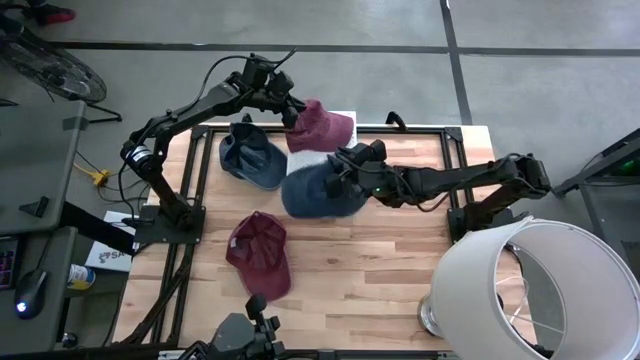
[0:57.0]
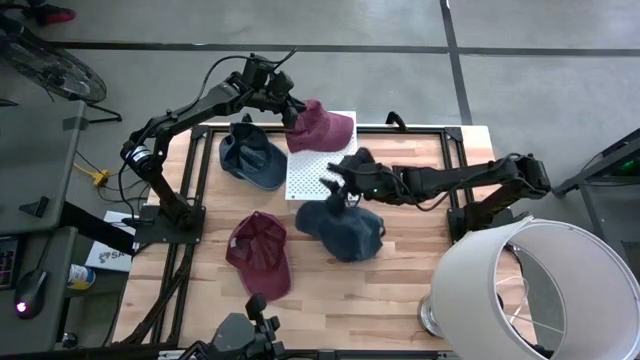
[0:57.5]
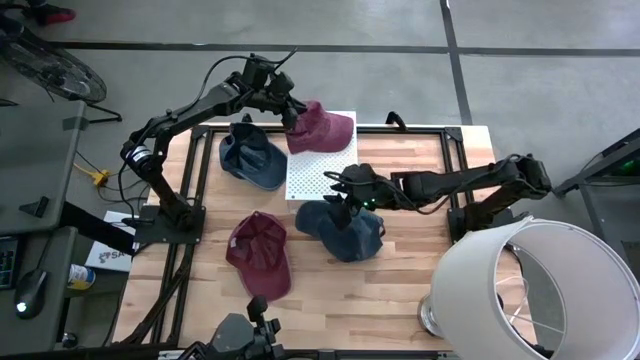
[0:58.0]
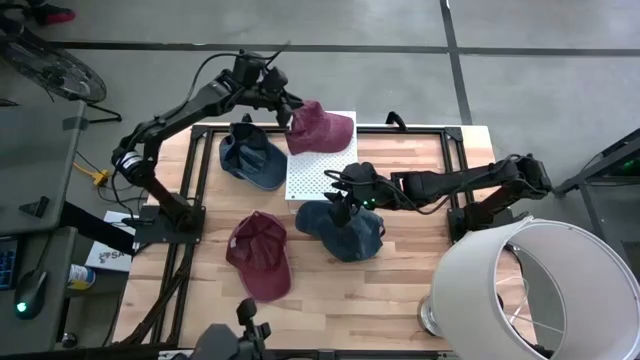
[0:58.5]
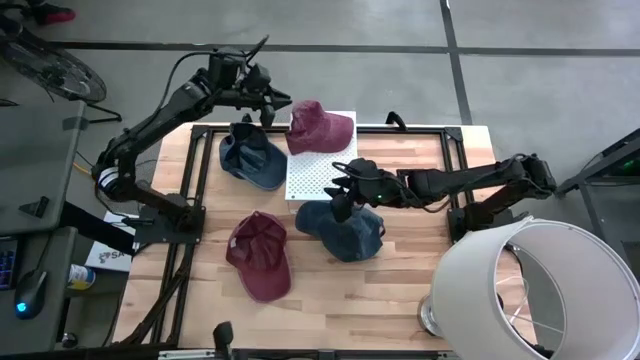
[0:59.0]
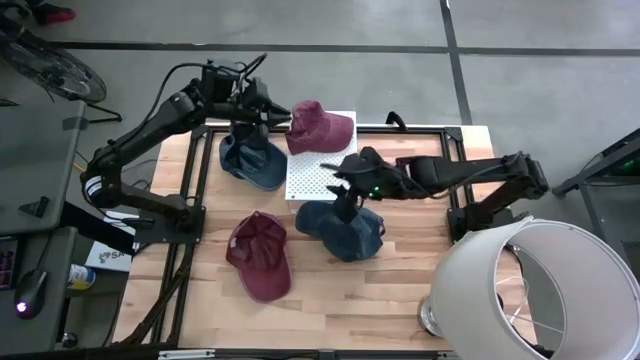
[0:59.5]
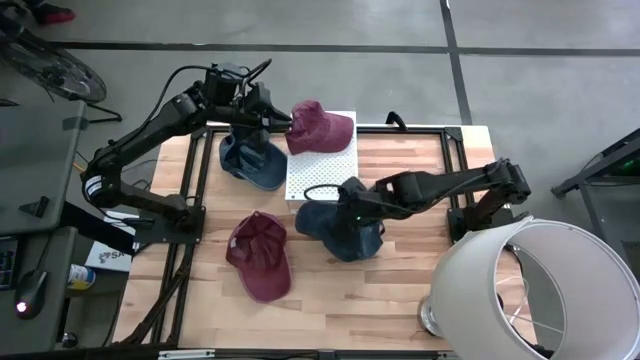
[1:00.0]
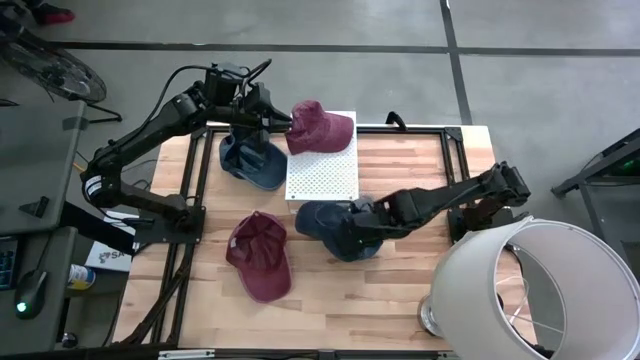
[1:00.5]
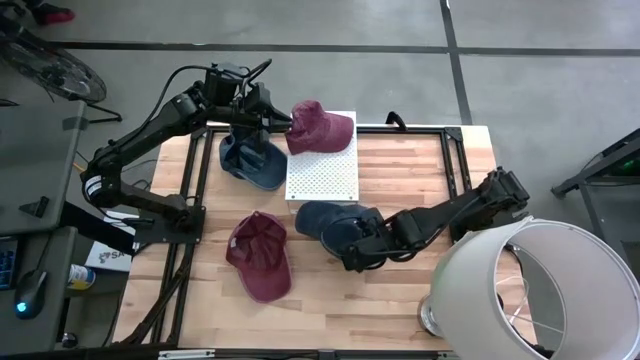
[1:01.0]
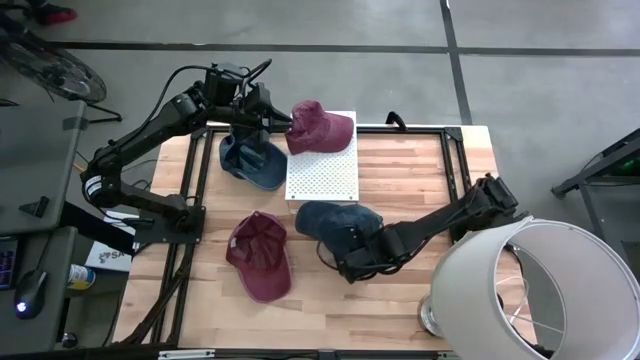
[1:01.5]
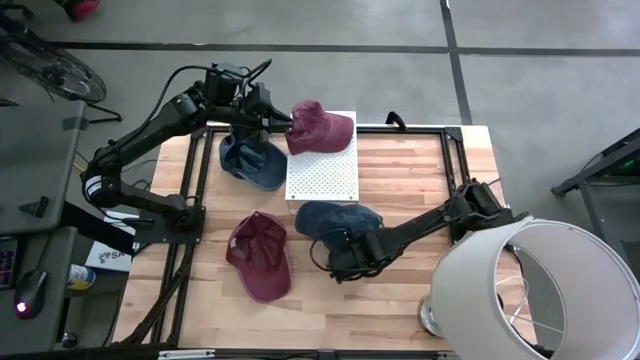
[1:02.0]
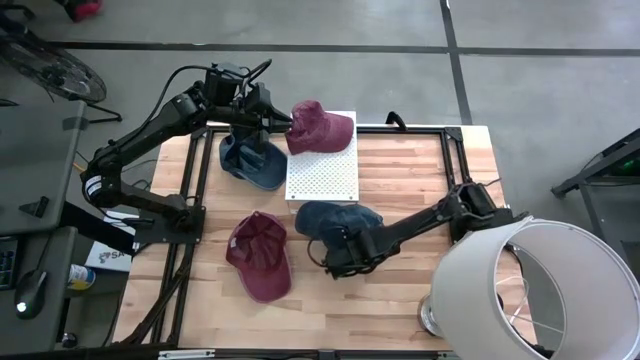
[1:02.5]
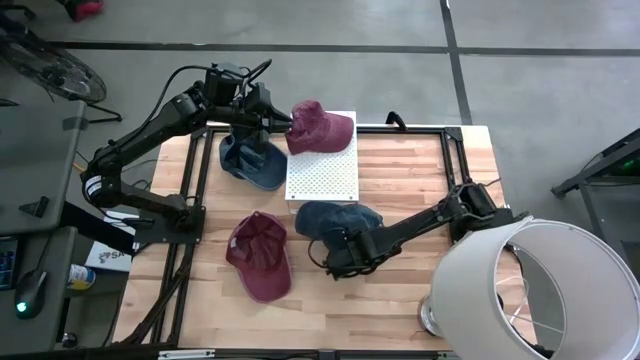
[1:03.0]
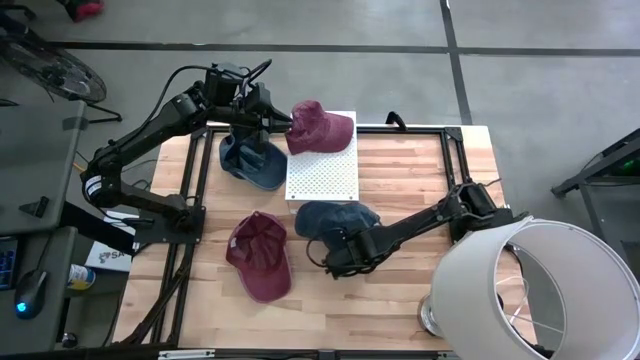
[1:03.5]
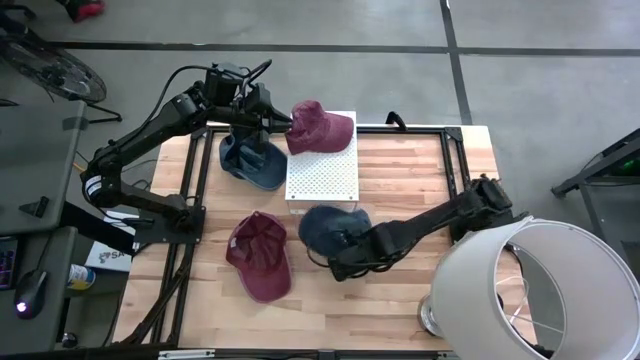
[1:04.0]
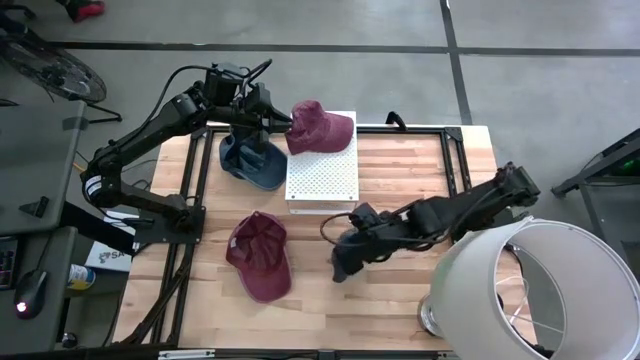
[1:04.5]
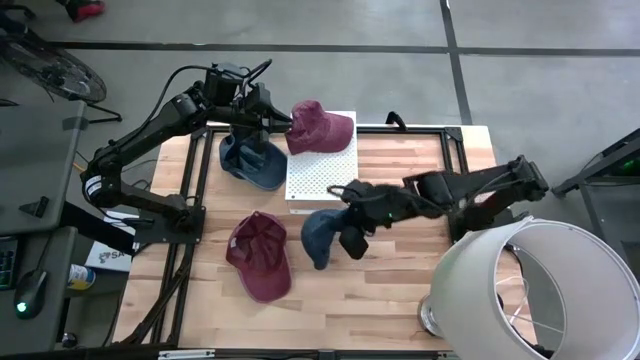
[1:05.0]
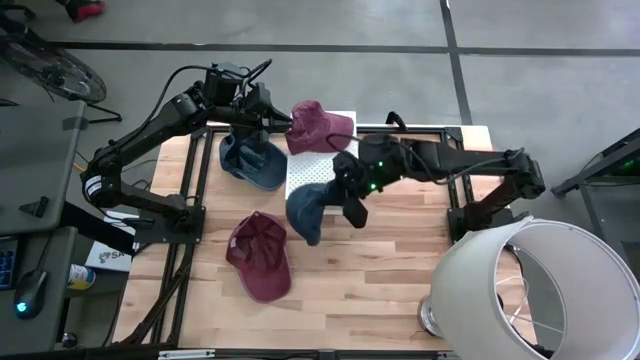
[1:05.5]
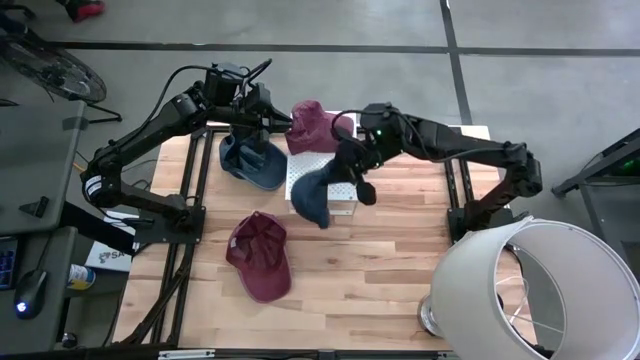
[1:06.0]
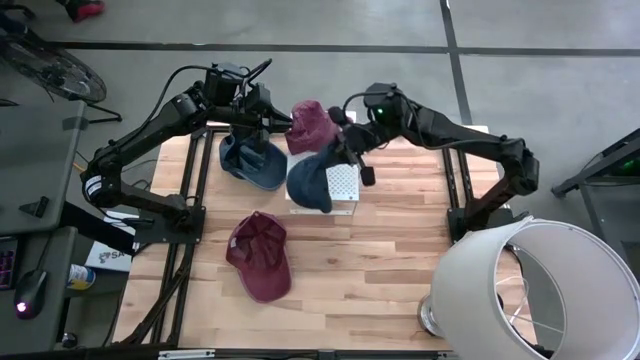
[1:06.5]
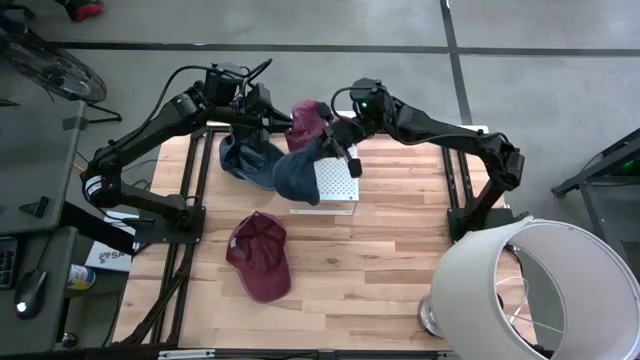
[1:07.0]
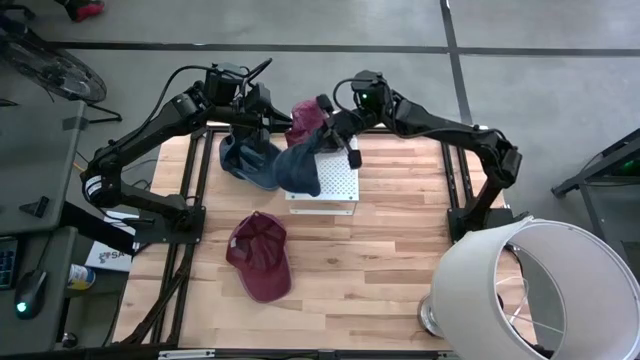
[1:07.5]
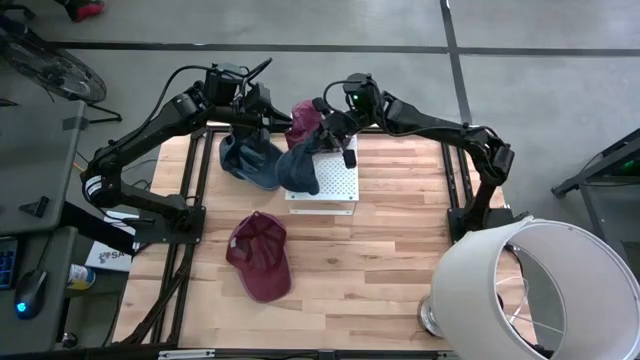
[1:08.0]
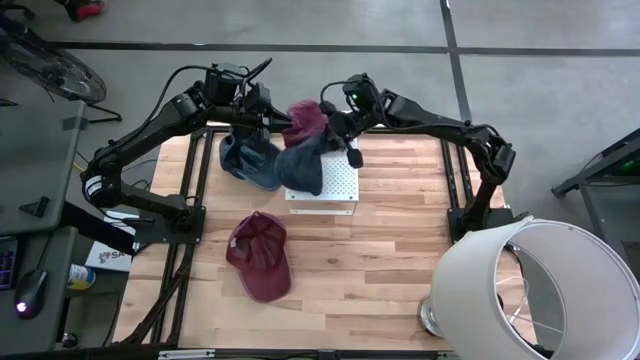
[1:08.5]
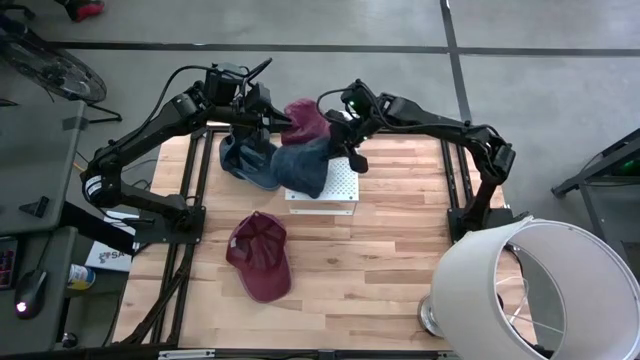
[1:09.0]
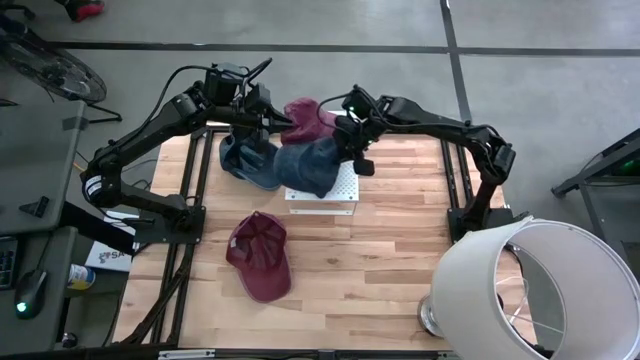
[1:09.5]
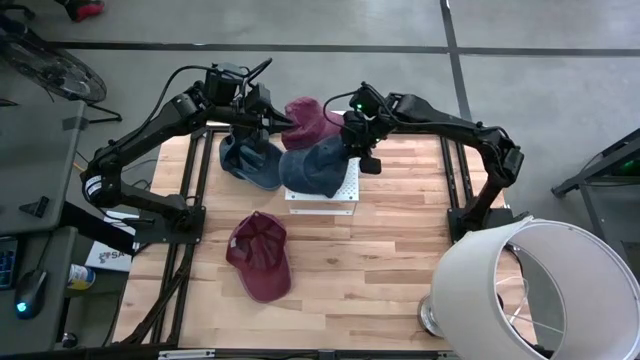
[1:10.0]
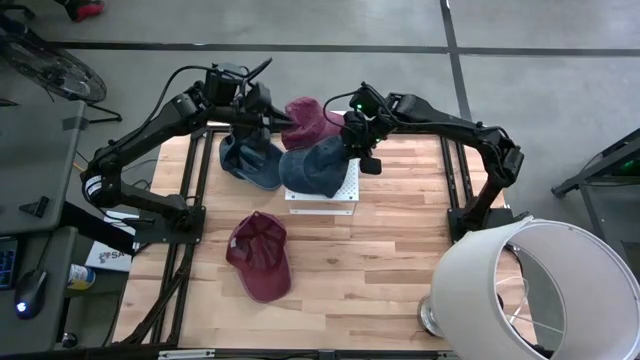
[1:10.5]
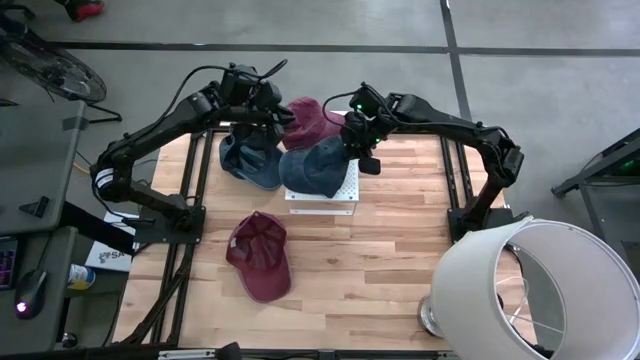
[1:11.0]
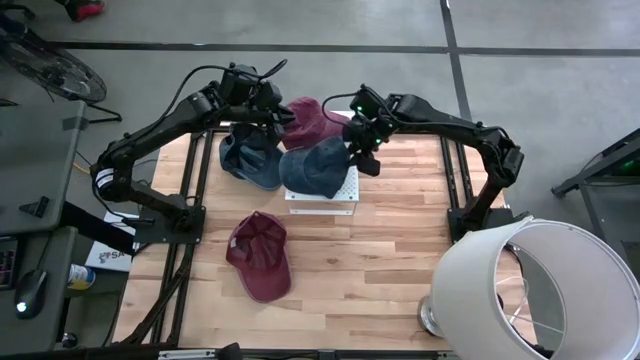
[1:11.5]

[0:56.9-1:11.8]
Task: Pick & Place hat
Put the bottom blue cap on the shelf
